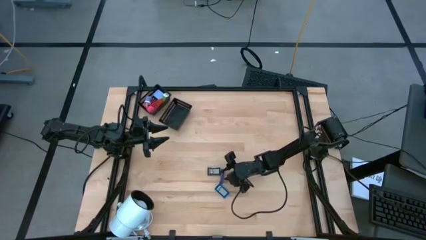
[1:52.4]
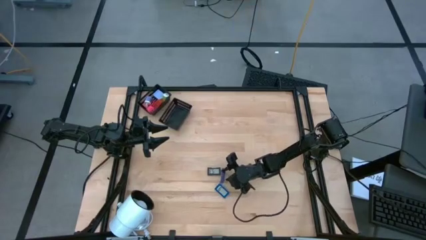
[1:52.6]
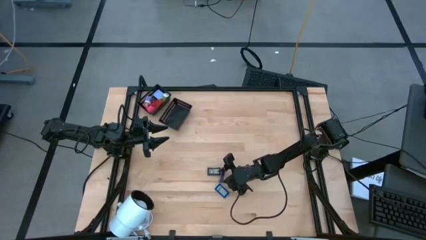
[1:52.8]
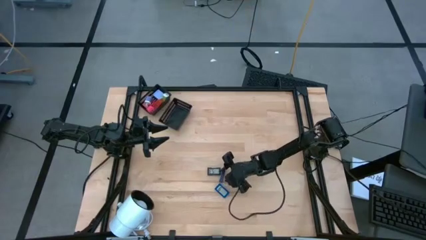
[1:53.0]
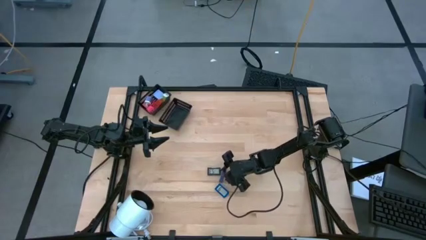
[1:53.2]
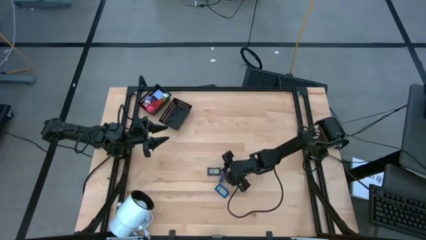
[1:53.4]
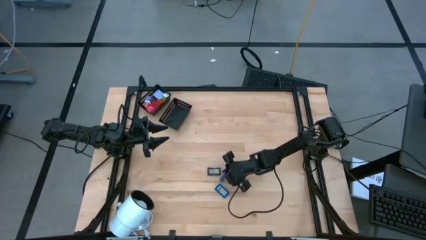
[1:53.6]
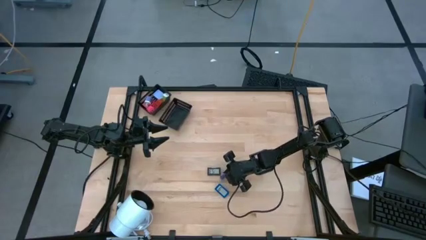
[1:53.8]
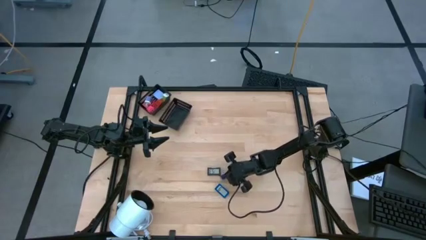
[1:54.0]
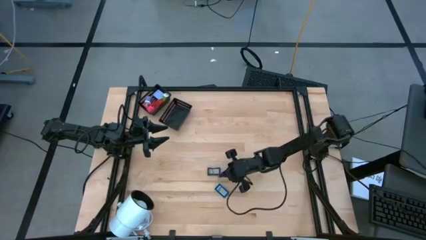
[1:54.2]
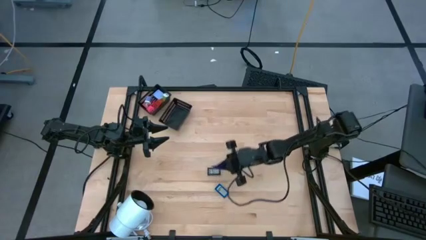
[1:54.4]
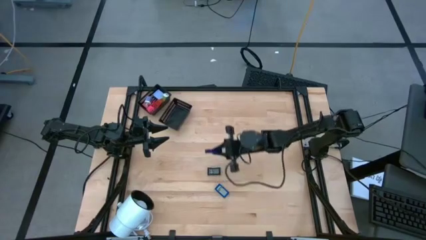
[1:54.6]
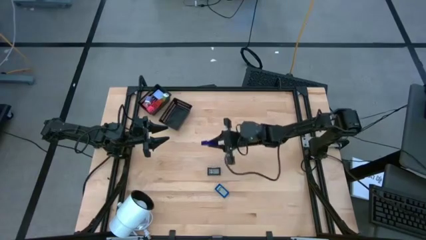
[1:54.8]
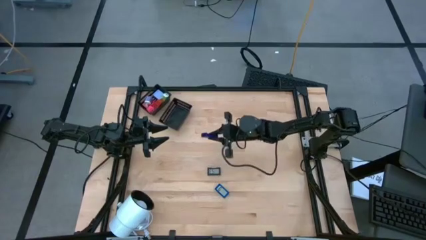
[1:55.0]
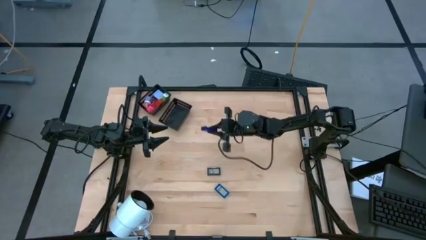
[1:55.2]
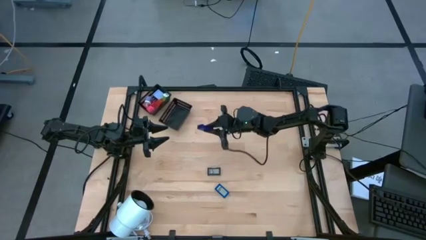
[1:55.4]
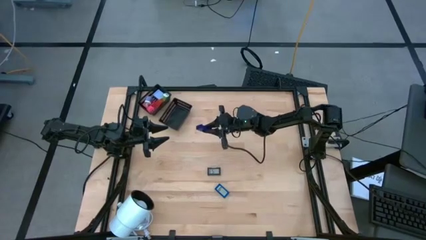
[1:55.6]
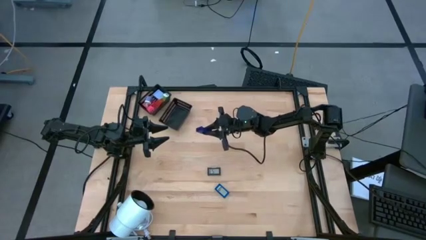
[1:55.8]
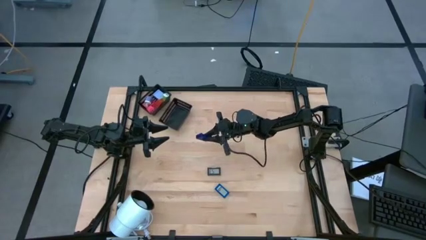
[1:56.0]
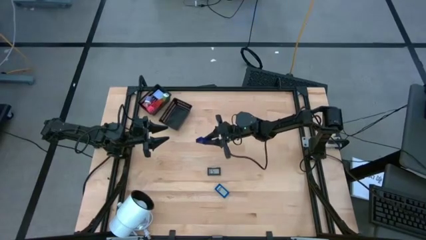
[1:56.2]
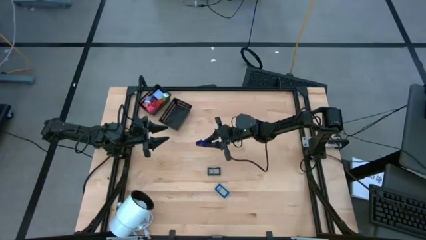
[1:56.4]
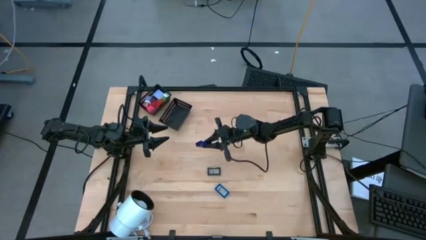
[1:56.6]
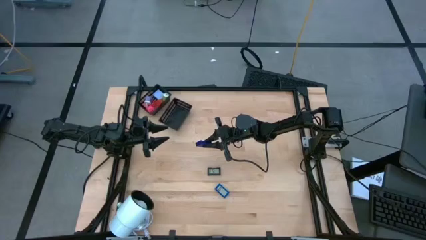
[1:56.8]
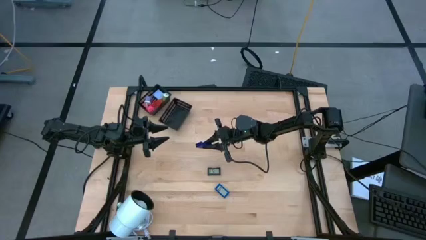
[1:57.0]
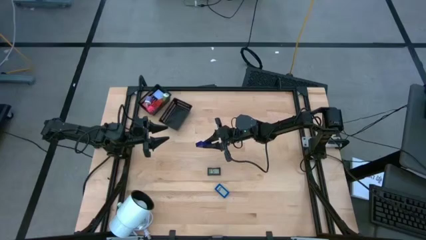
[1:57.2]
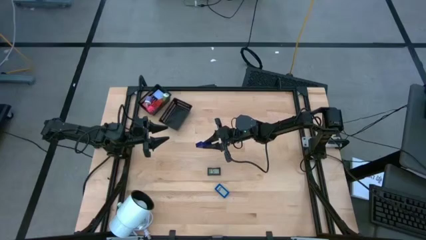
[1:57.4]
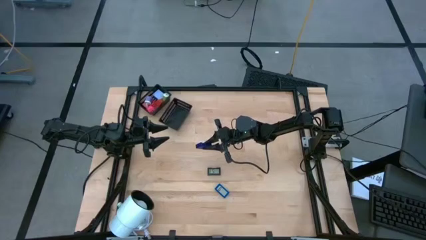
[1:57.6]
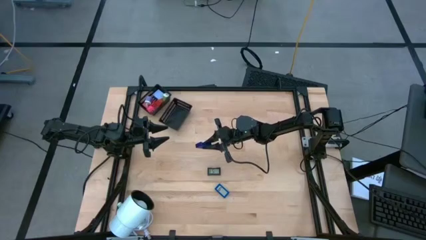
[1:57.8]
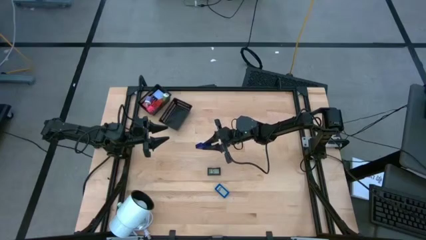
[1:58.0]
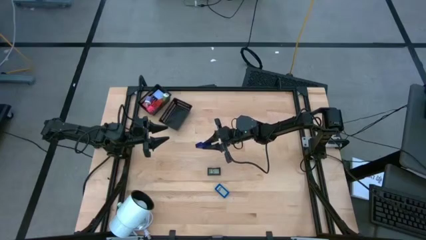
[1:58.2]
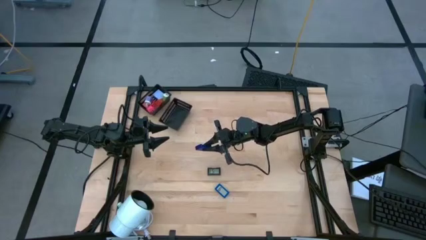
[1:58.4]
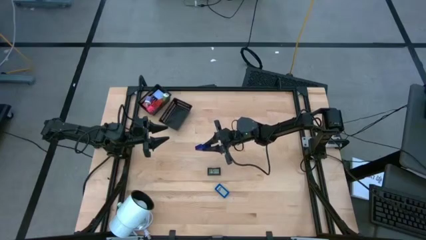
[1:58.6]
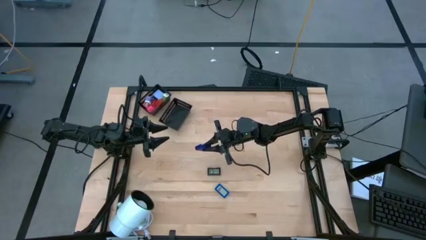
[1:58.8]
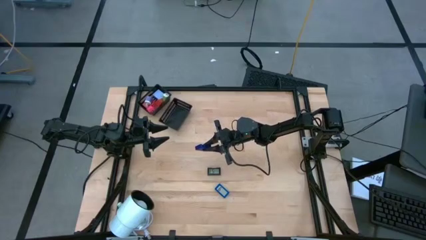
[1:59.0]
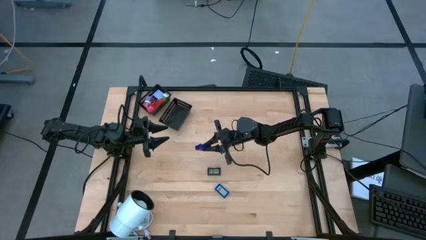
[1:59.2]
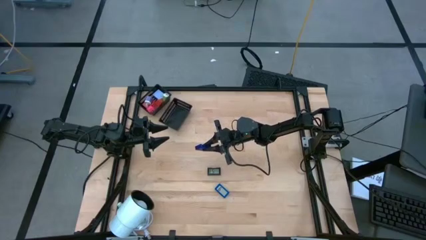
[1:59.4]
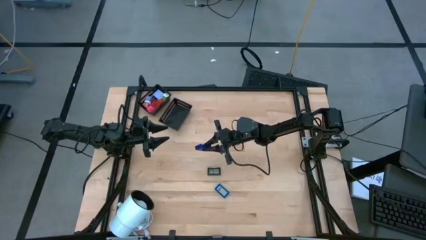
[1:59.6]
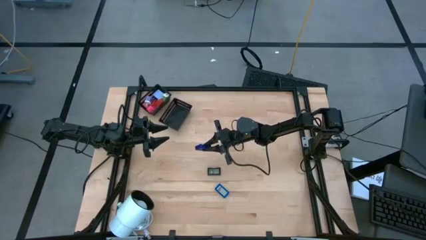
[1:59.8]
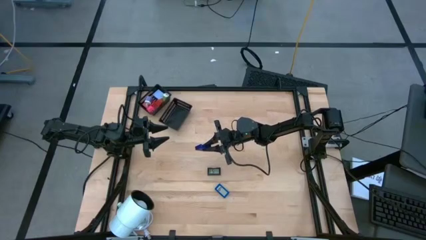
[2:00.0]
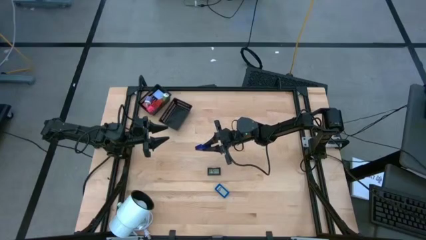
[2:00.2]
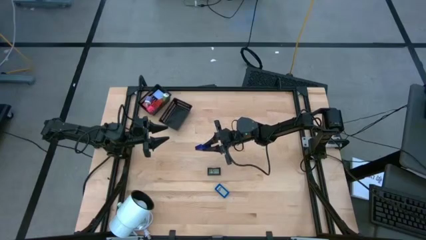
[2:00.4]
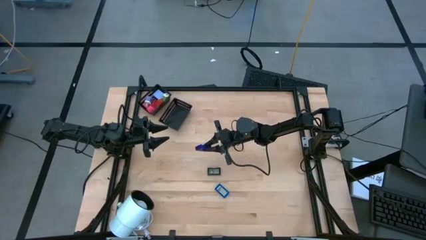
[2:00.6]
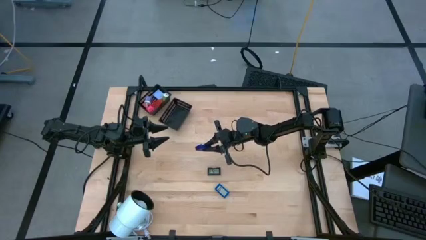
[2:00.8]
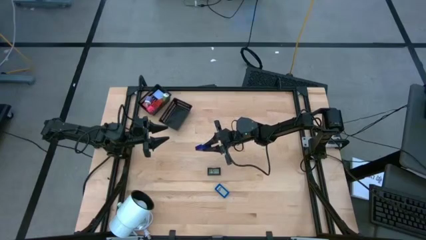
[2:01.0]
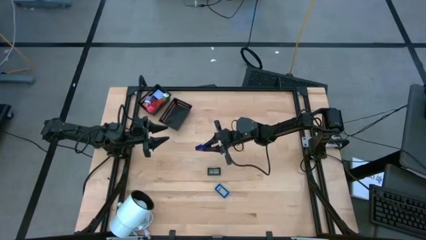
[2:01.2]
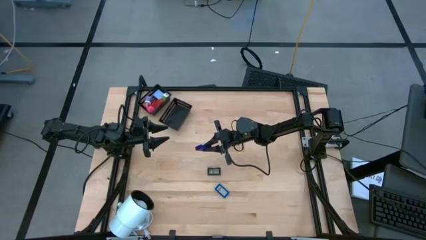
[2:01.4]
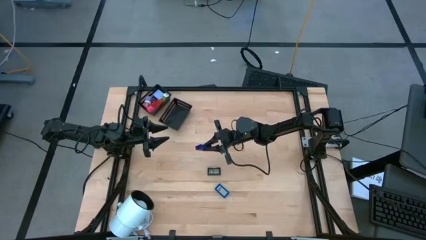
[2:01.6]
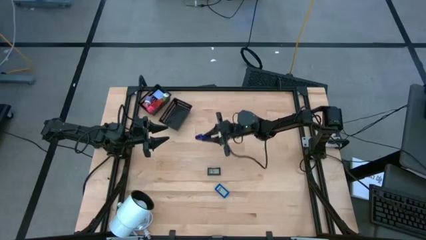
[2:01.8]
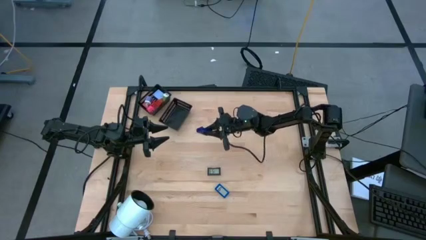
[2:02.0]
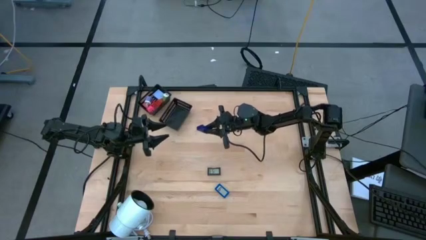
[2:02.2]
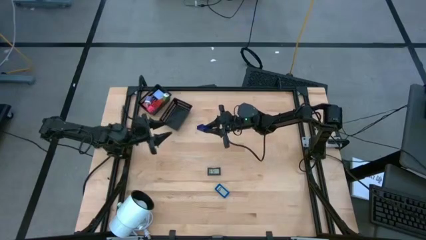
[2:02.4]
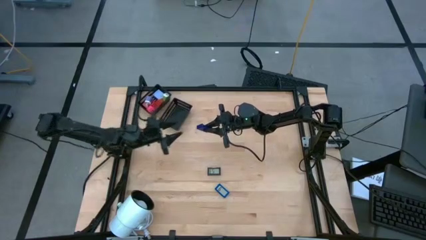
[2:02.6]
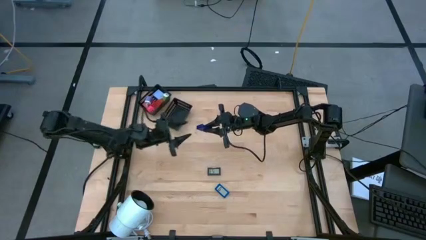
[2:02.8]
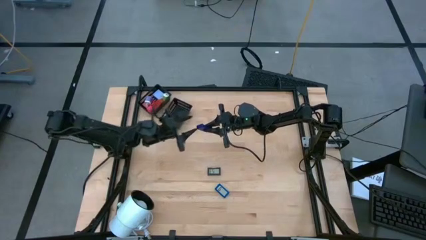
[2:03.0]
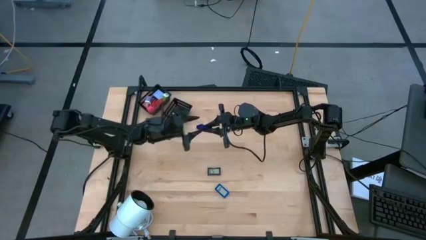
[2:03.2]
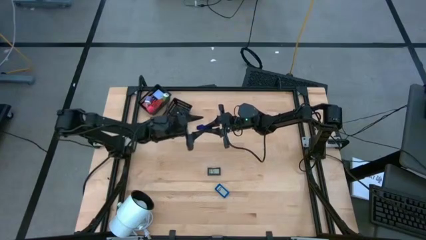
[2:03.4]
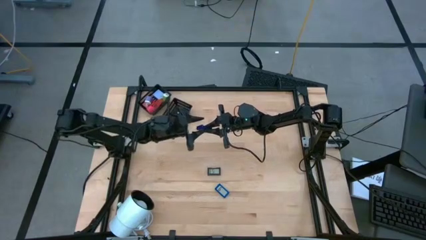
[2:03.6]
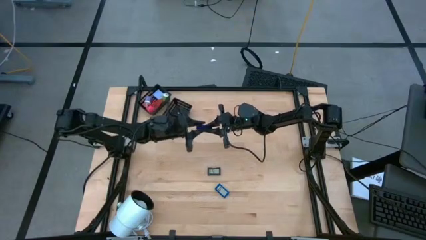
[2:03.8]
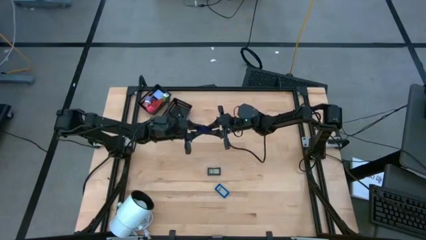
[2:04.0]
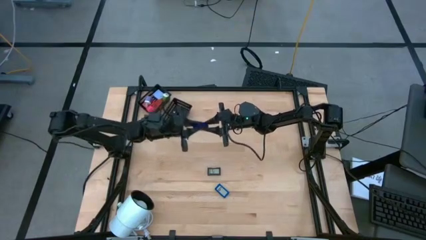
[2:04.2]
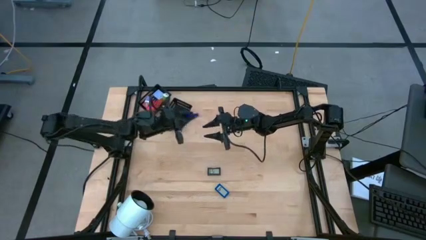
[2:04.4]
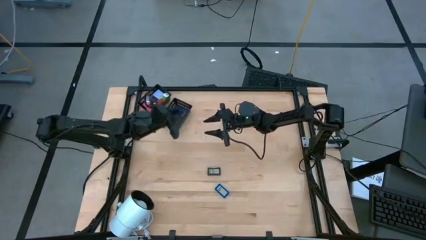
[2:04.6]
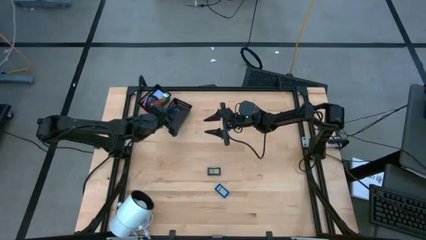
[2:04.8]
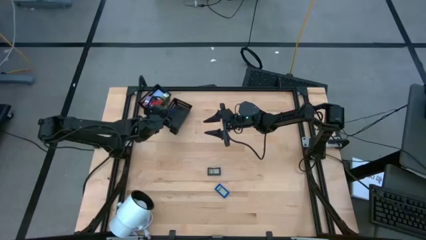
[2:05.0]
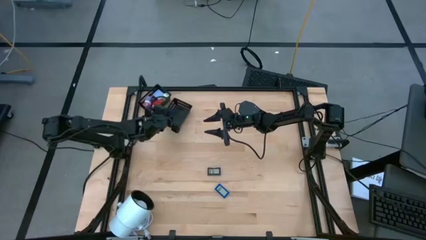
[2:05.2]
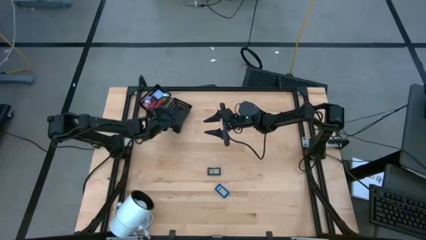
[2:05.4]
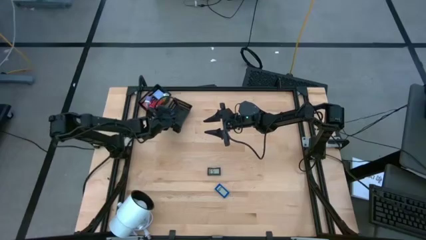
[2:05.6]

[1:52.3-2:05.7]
Task: Pick & Place Office items
Put the dark blue timer into the bottom black bin

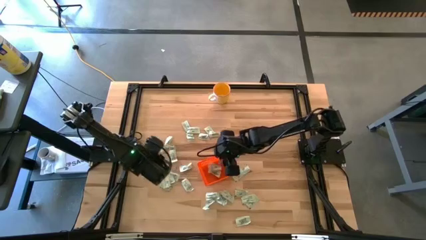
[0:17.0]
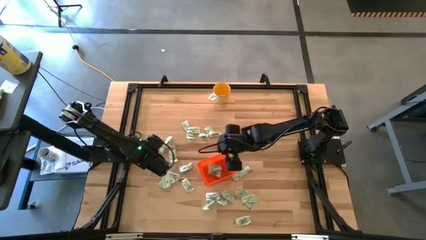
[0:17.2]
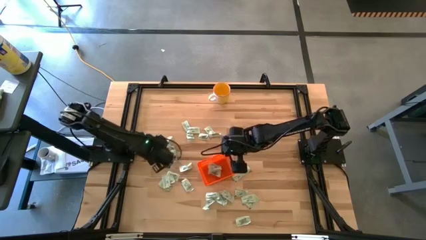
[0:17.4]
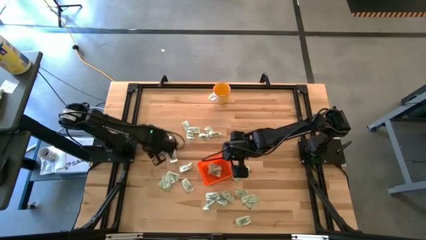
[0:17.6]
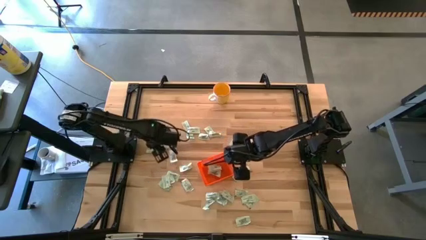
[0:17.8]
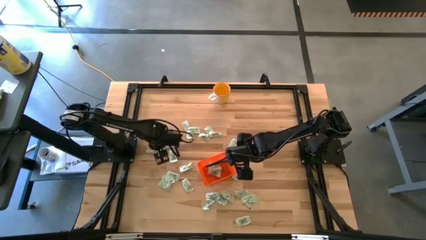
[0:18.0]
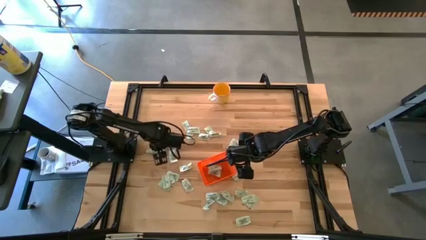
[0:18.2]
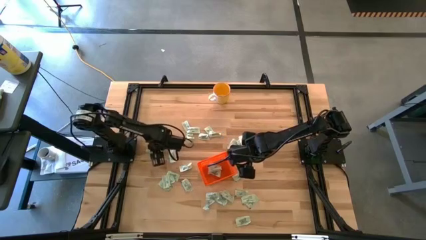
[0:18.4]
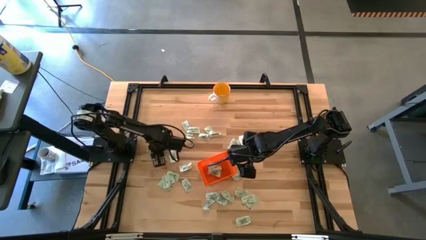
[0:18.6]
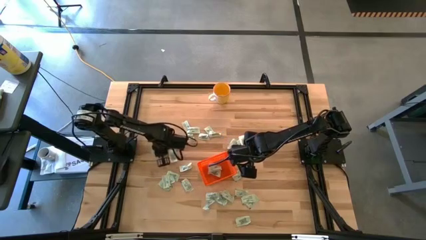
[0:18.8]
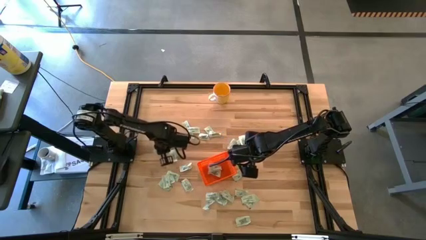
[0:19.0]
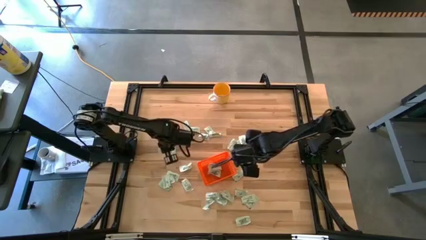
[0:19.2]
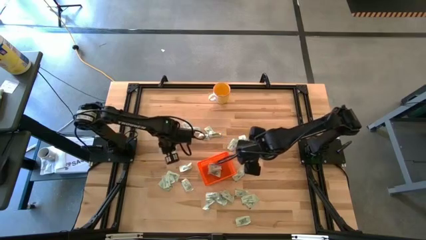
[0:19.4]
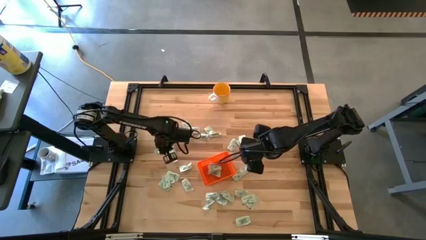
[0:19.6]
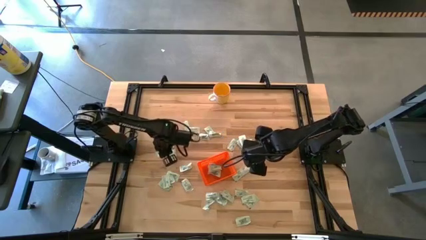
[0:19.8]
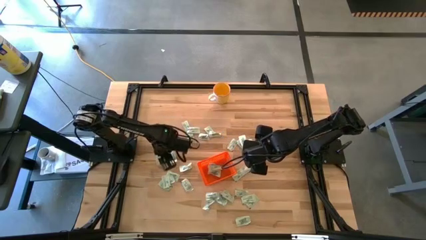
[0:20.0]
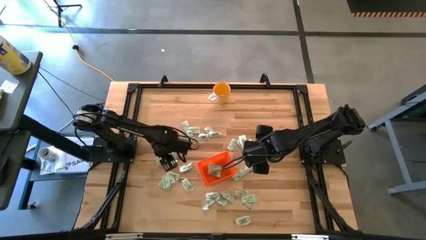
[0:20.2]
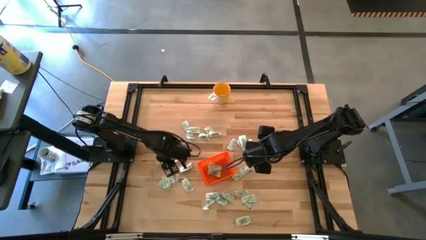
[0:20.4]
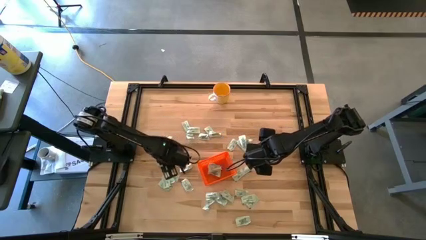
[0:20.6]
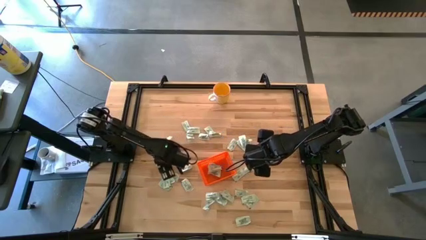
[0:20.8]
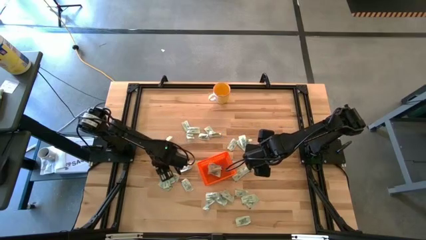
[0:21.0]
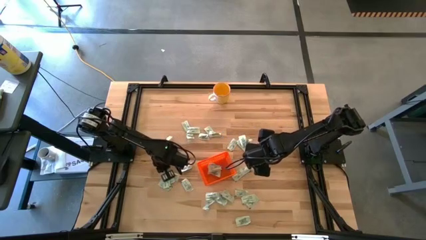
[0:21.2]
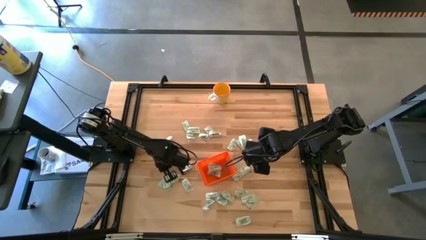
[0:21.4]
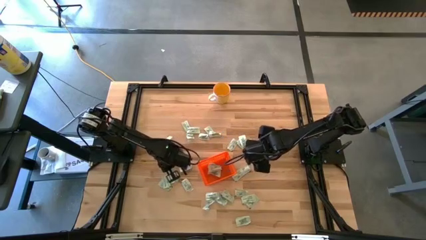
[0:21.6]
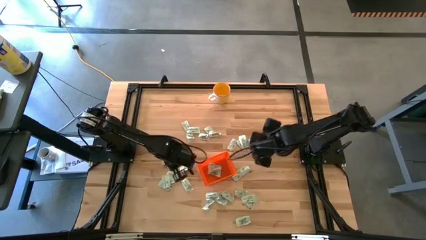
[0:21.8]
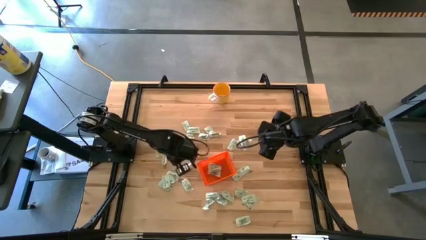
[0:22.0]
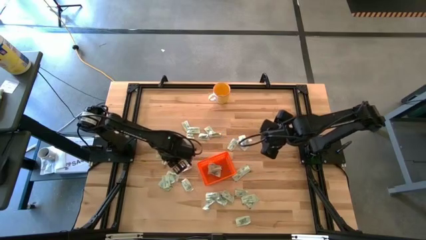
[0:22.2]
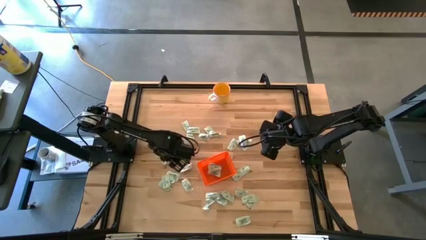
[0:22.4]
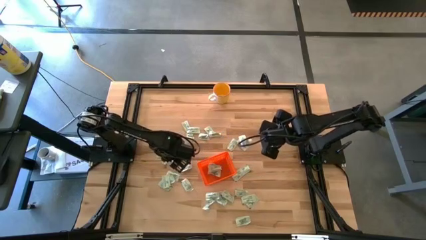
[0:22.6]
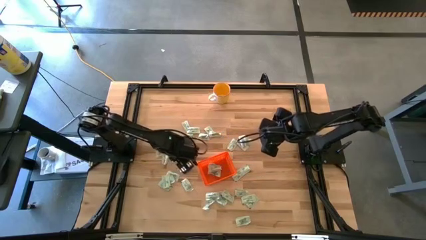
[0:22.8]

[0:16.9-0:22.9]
Task: Pick and place Stevia / Truvia into bins
Put the stevia packet into the bin
